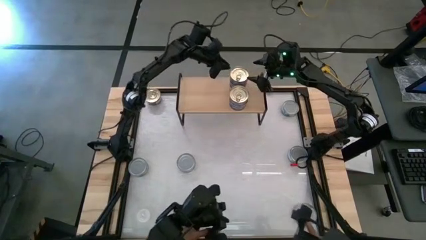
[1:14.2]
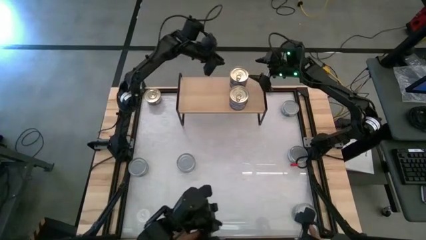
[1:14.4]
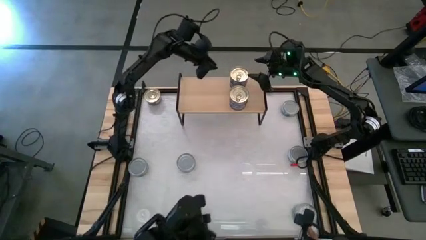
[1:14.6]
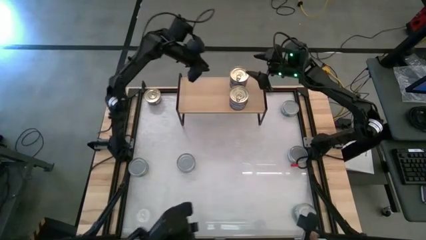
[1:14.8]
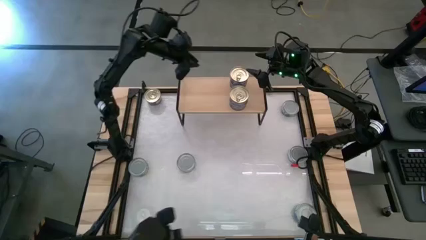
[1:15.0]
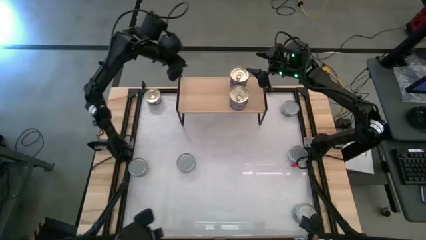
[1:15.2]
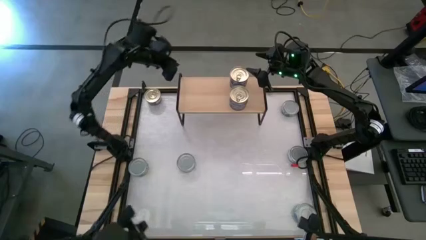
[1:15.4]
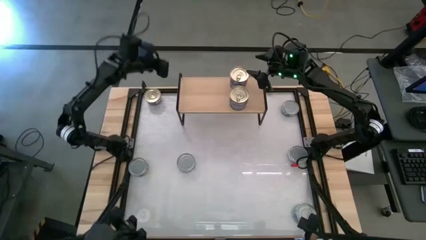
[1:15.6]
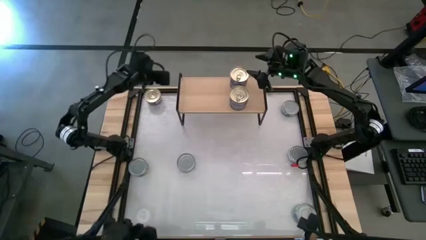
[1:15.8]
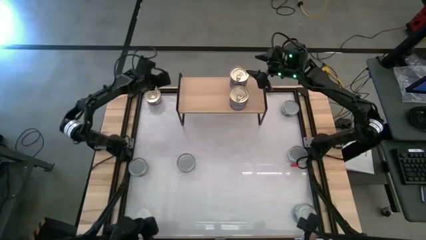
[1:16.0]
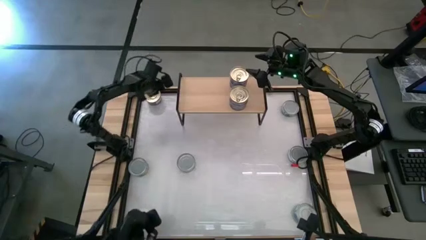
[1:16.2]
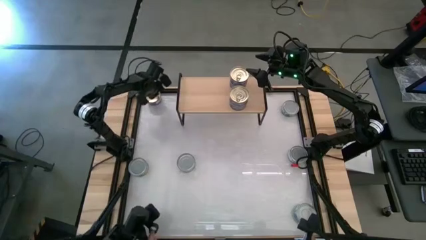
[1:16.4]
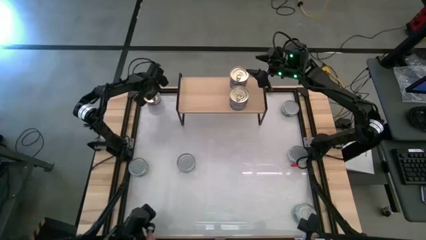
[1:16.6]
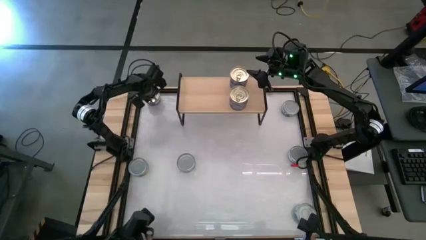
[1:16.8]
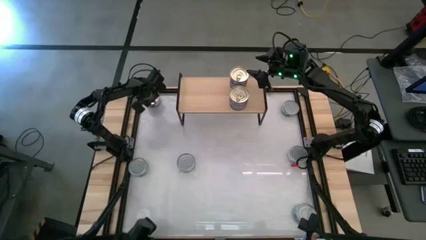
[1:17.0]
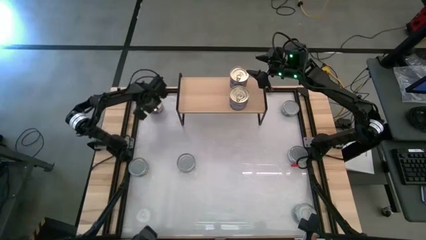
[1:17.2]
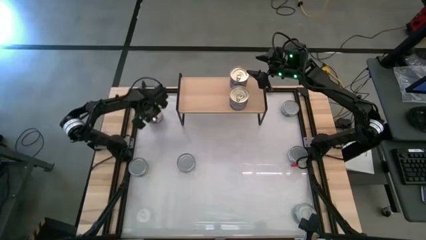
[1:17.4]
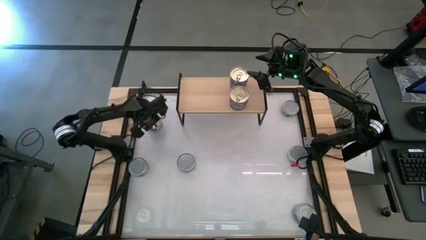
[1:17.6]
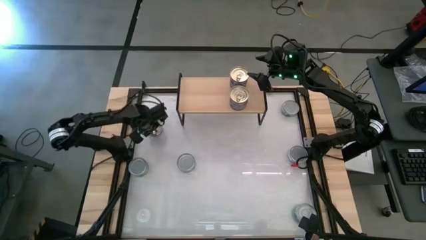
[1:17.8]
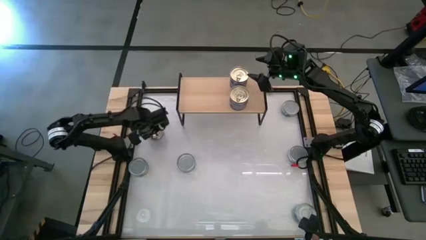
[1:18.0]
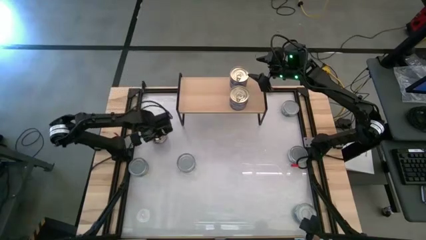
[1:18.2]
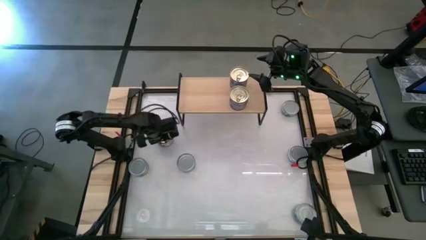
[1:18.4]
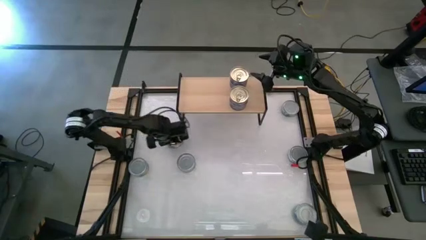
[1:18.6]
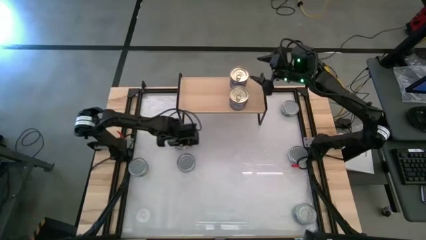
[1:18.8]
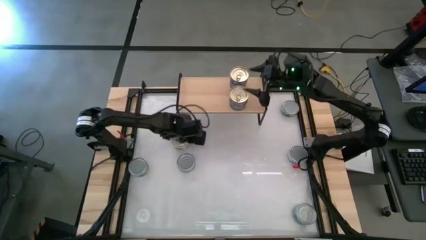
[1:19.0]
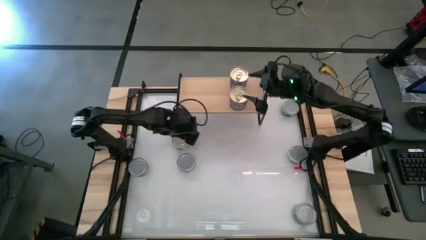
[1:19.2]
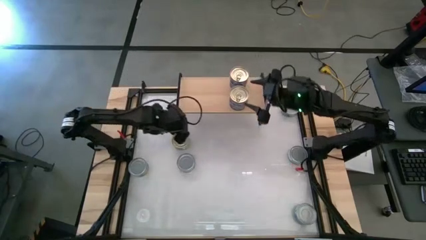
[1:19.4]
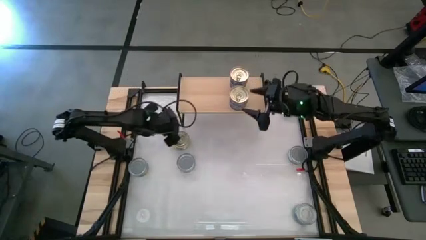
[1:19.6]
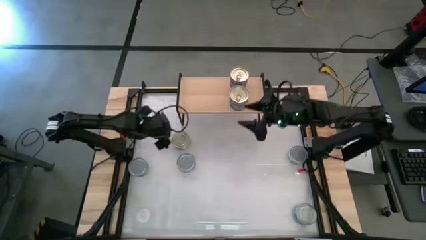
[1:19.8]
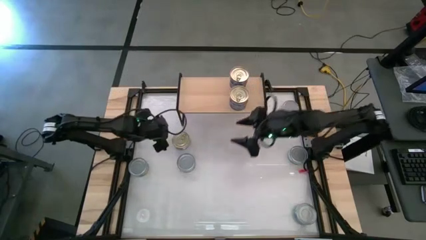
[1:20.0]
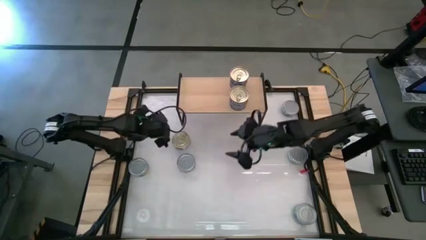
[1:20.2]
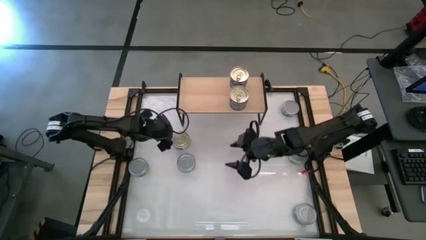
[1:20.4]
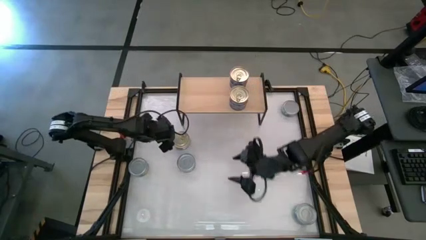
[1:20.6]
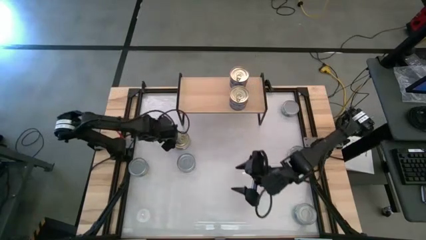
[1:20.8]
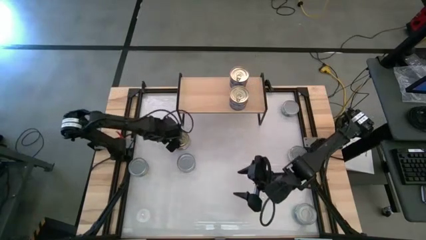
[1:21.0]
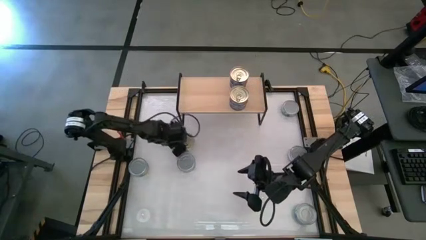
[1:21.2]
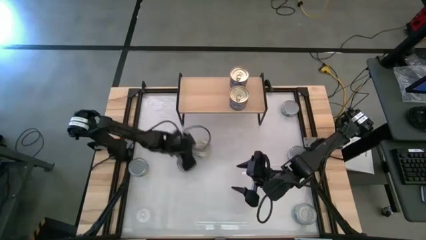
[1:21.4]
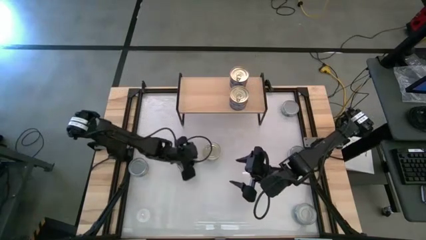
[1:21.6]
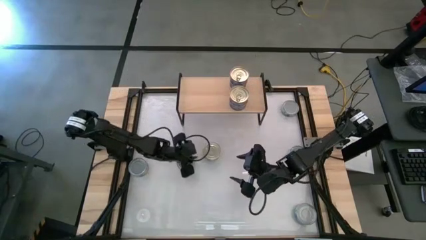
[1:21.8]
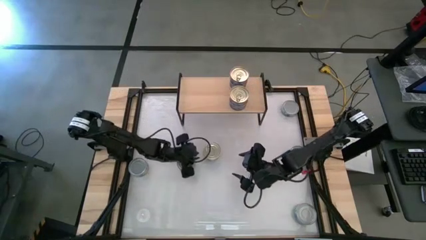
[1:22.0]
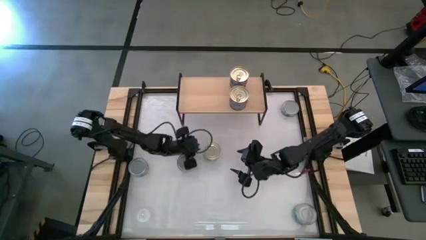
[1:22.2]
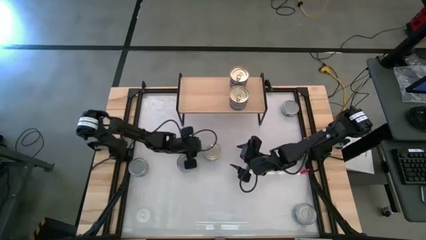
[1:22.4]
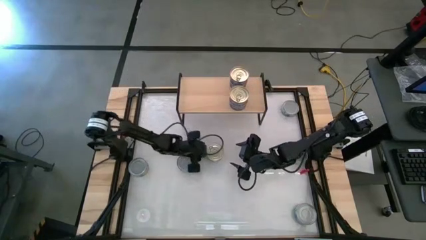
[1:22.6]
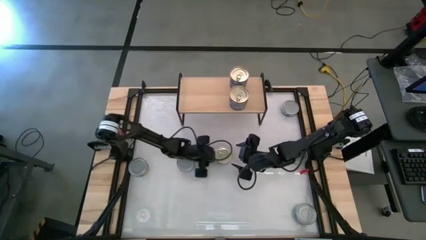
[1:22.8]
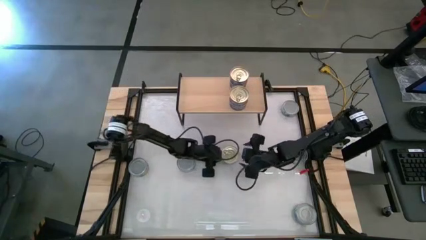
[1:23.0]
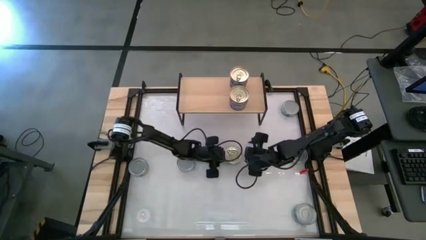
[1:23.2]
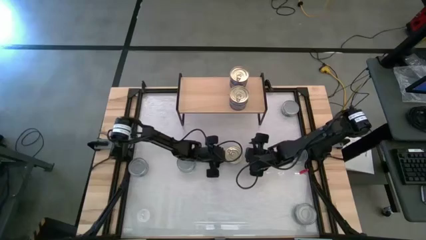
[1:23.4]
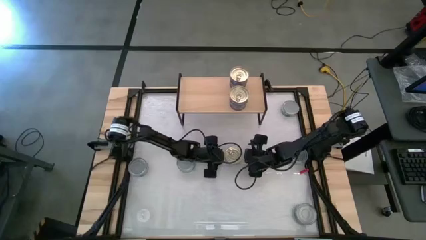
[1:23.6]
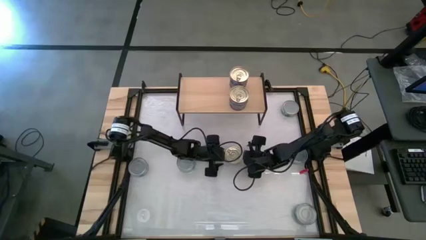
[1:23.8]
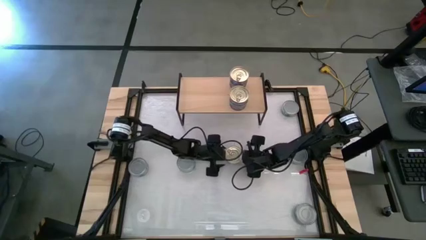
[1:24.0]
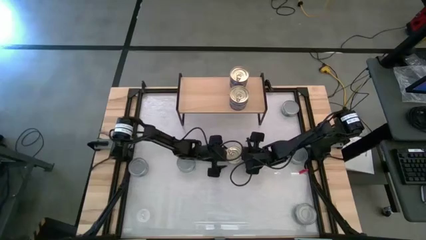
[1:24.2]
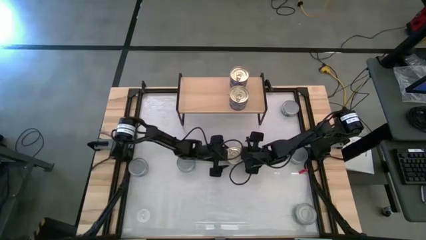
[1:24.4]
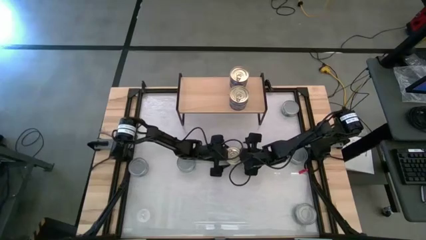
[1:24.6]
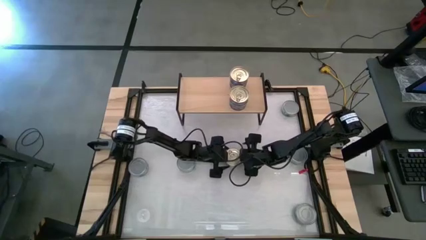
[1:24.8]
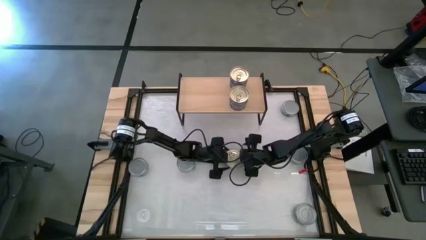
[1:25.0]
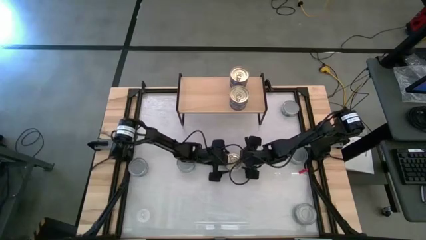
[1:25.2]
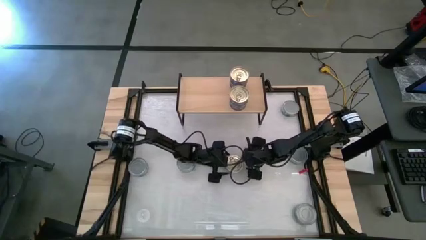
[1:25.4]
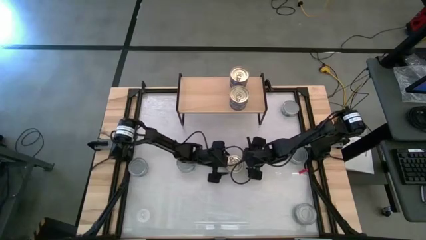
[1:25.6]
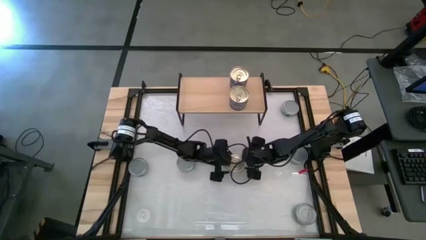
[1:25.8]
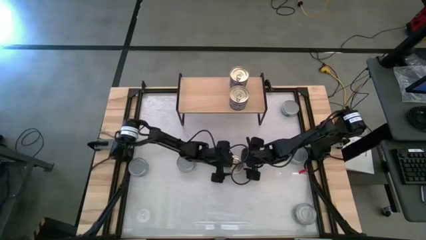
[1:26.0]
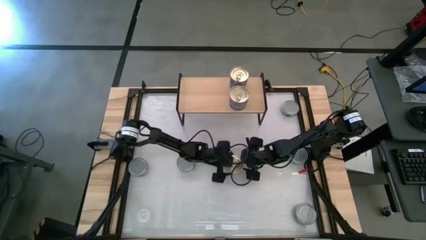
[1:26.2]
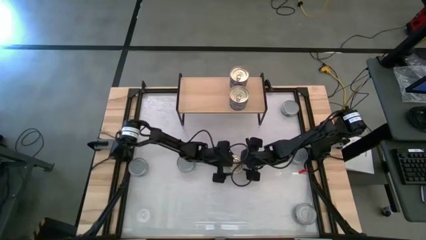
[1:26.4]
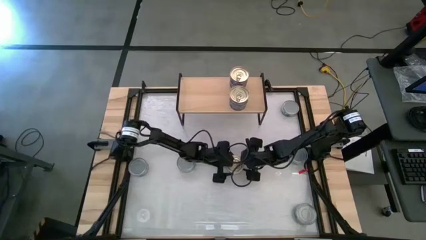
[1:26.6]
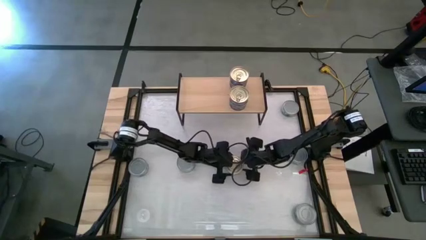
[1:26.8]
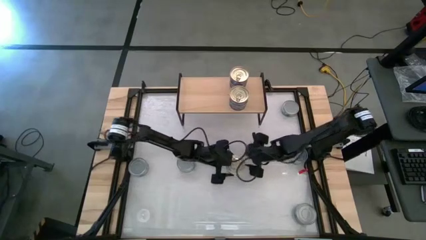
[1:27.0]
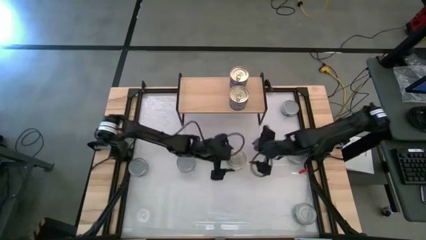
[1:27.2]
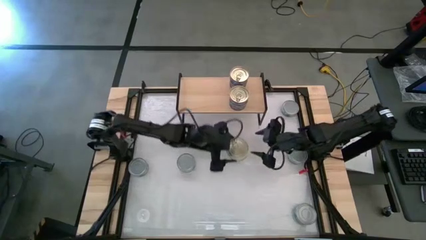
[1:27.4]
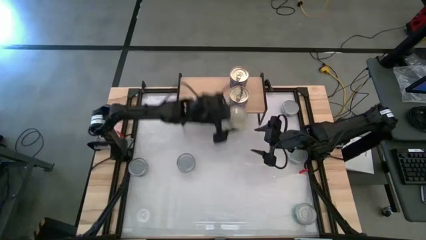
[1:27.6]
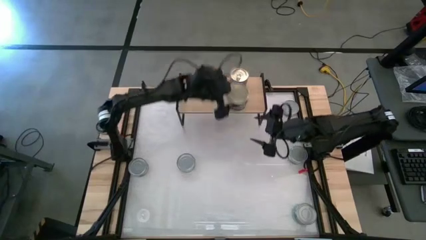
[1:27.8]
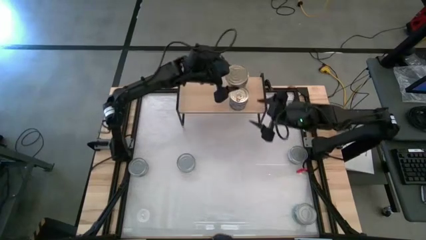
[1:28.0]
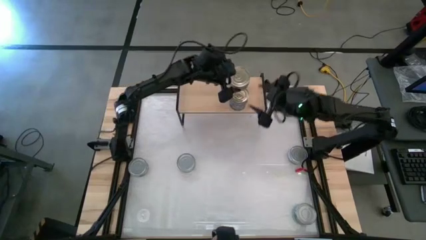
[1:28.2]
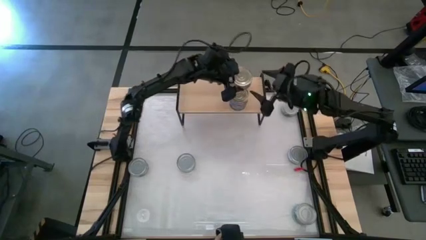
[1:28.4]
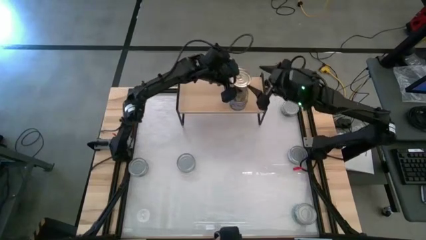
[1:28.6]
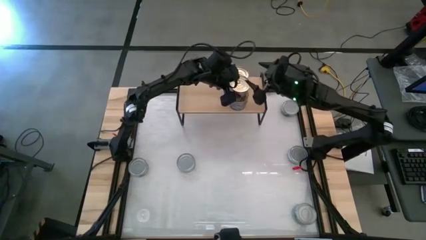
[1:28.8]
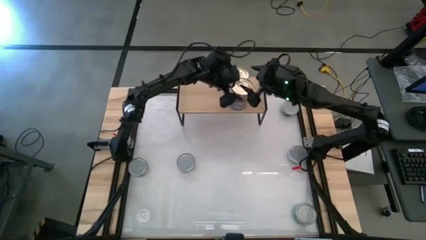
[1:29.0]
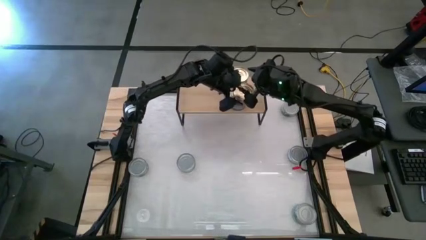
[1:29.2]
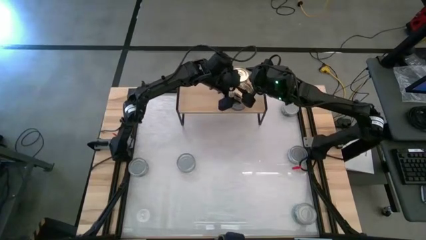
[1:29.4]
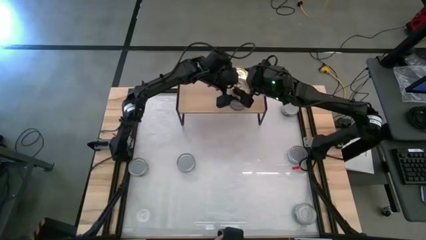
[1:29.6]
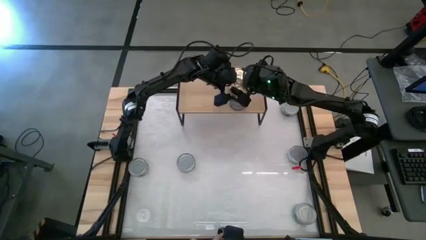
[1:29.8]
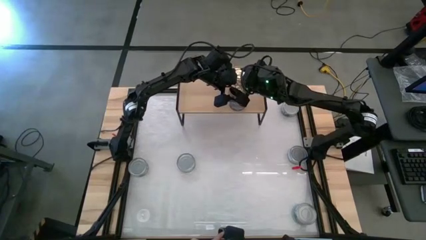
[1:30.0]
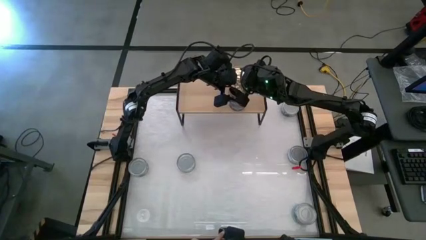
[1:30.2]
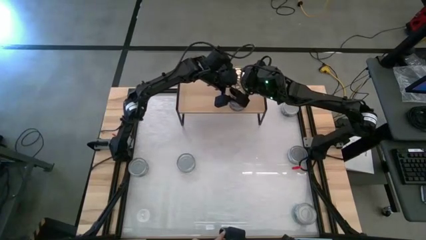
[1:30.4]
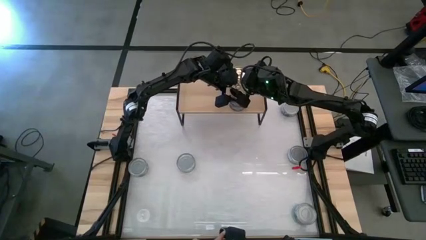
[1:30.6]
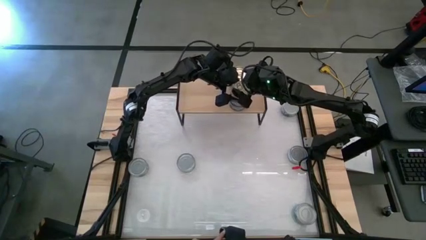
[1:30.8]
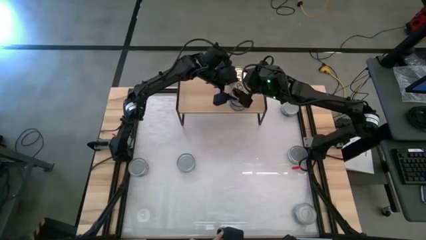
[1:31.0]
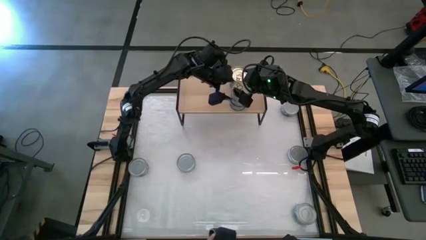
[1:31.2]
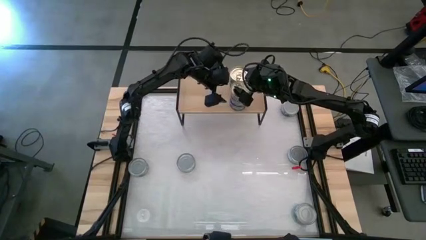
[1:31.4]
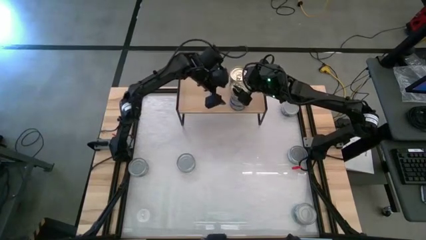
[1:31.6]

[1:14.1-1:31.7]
Task: Stack canned seafood by type on shelf
Stack the blue-pink tuna can on top of the other blue-pink tuna cans on the shelf
